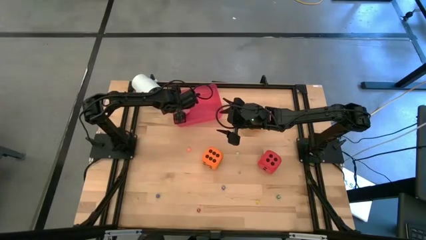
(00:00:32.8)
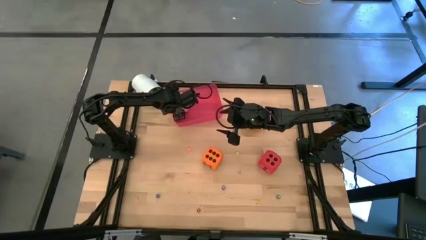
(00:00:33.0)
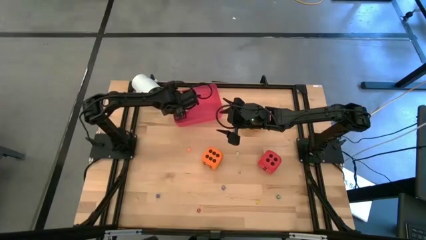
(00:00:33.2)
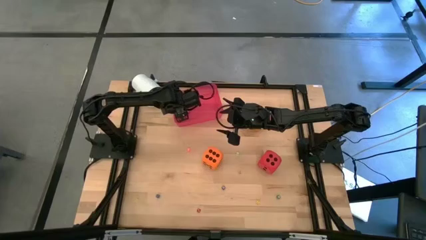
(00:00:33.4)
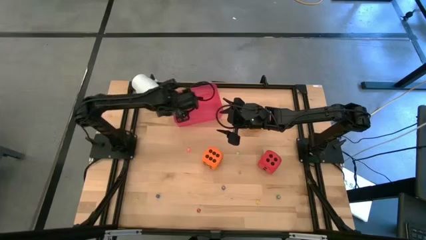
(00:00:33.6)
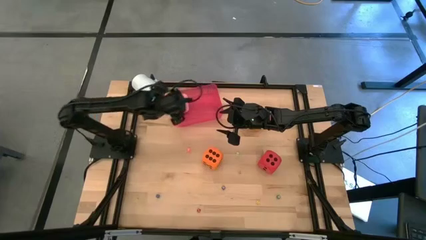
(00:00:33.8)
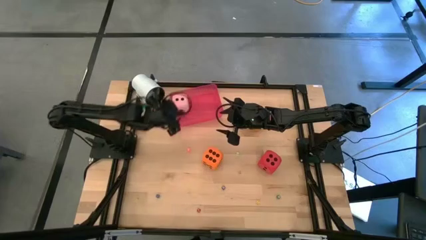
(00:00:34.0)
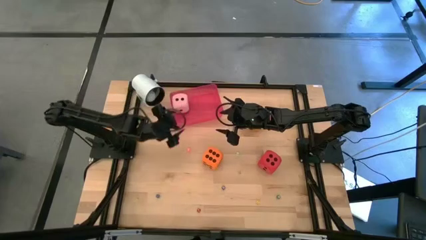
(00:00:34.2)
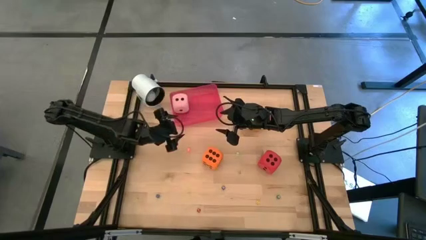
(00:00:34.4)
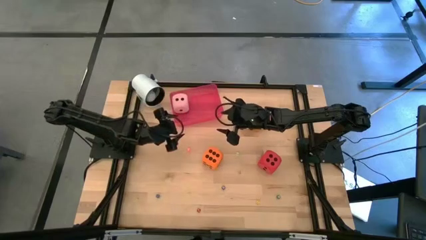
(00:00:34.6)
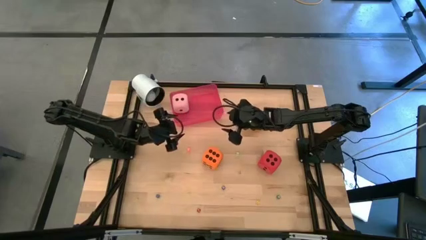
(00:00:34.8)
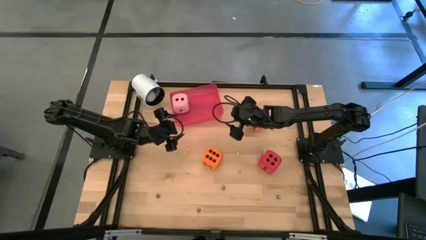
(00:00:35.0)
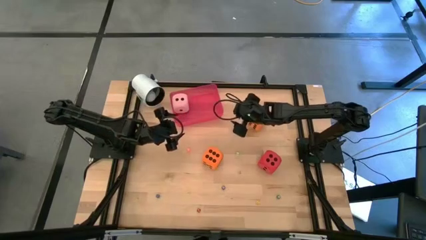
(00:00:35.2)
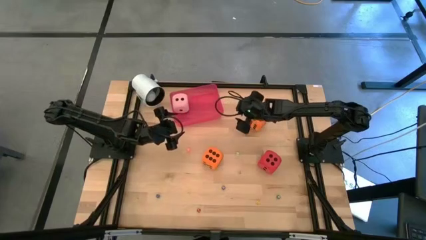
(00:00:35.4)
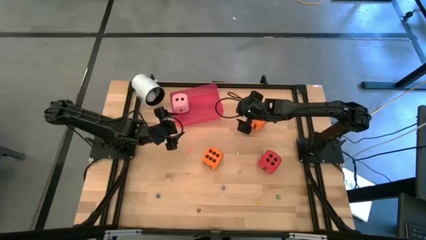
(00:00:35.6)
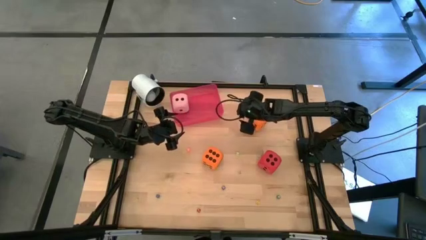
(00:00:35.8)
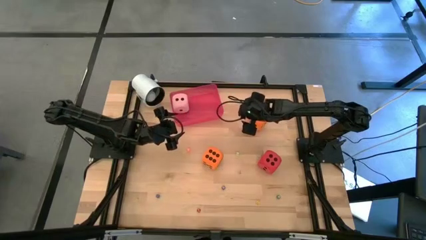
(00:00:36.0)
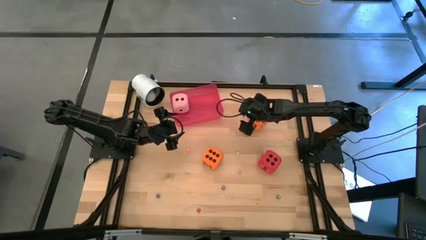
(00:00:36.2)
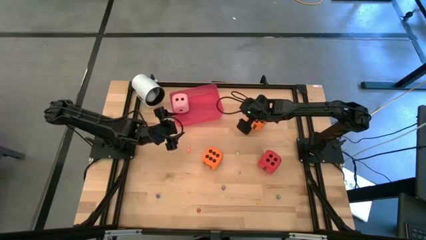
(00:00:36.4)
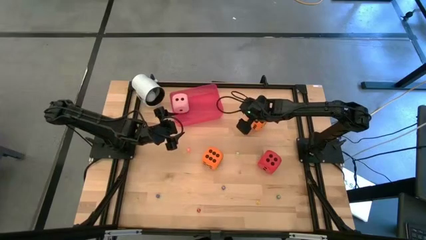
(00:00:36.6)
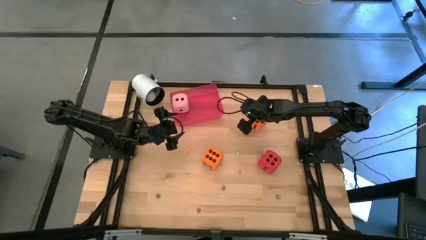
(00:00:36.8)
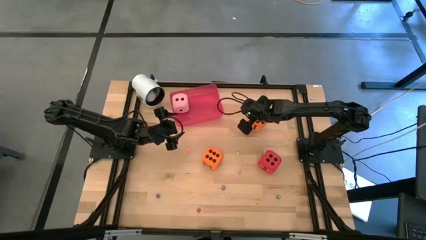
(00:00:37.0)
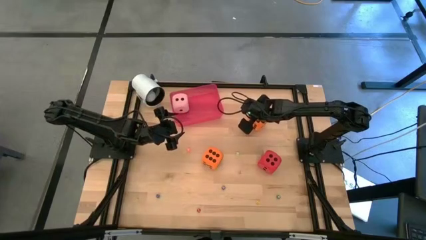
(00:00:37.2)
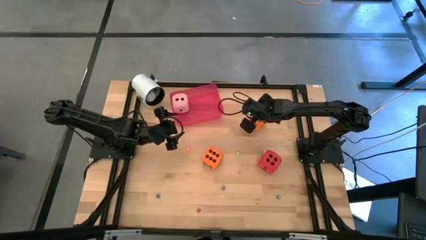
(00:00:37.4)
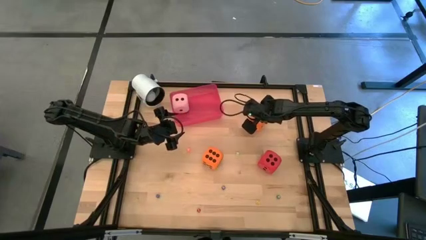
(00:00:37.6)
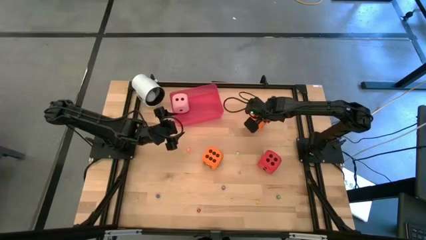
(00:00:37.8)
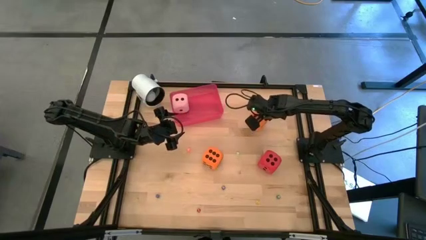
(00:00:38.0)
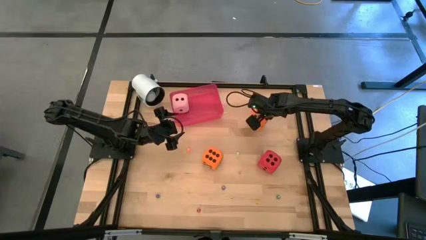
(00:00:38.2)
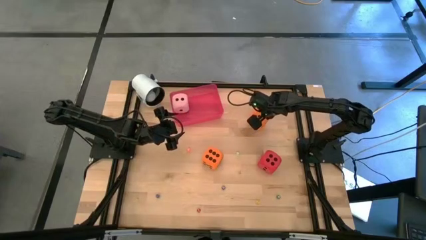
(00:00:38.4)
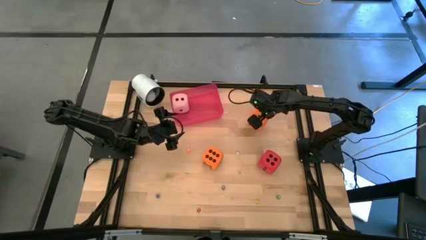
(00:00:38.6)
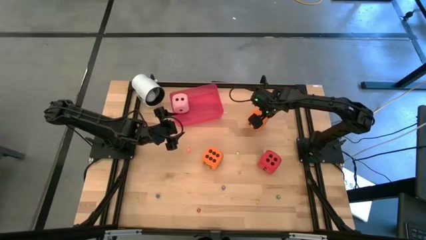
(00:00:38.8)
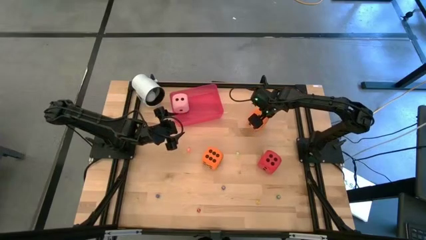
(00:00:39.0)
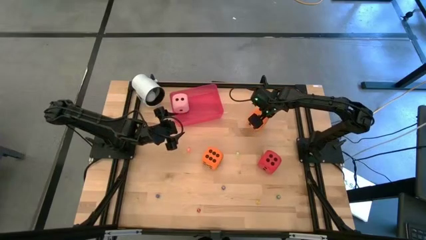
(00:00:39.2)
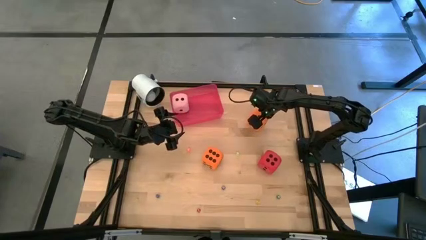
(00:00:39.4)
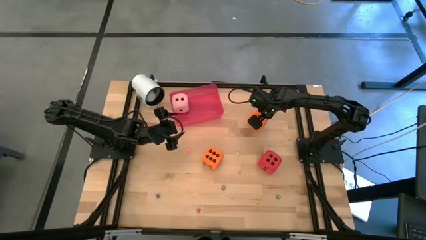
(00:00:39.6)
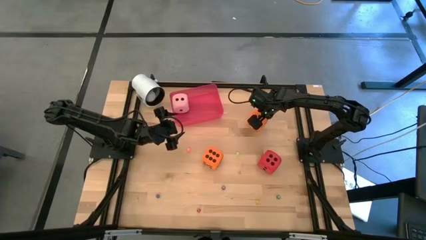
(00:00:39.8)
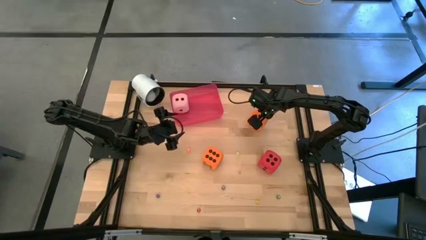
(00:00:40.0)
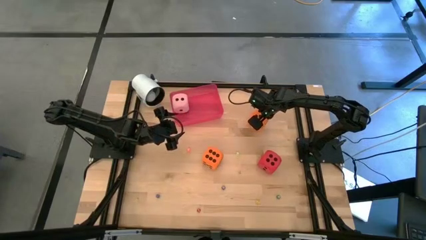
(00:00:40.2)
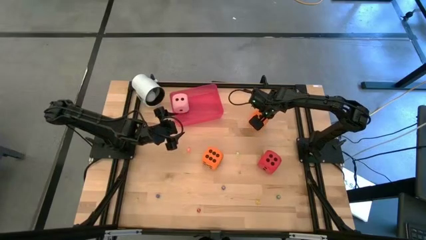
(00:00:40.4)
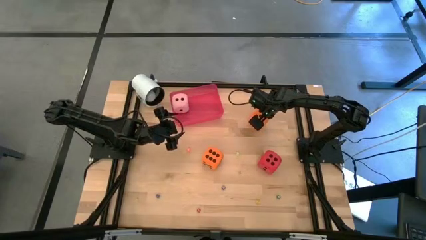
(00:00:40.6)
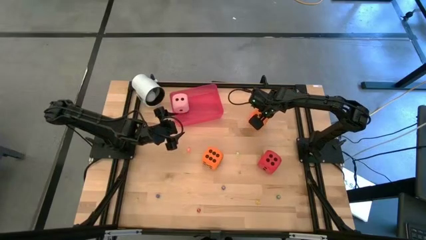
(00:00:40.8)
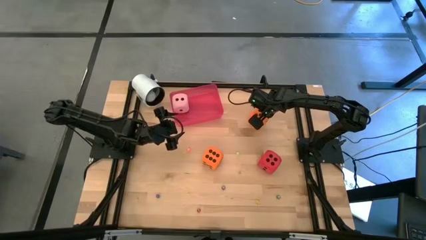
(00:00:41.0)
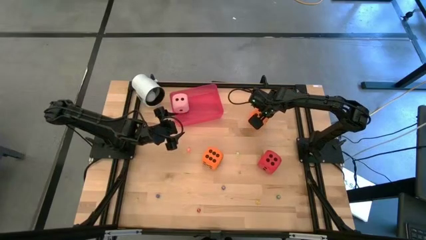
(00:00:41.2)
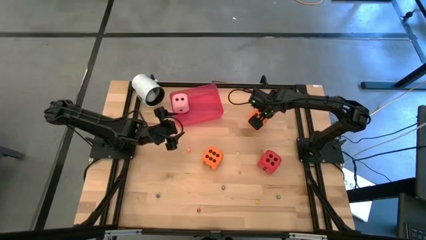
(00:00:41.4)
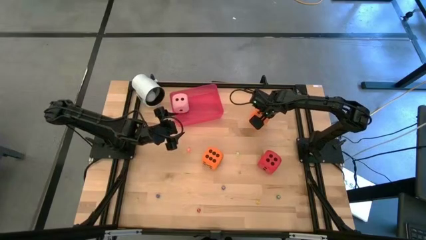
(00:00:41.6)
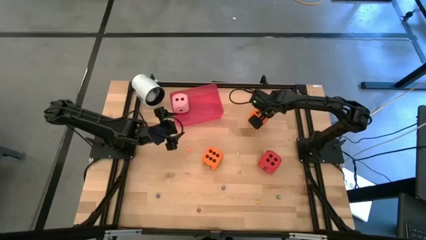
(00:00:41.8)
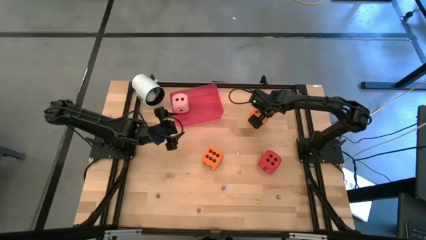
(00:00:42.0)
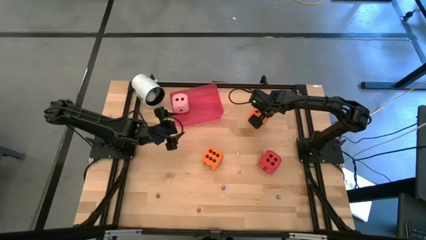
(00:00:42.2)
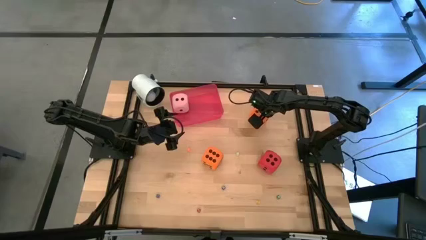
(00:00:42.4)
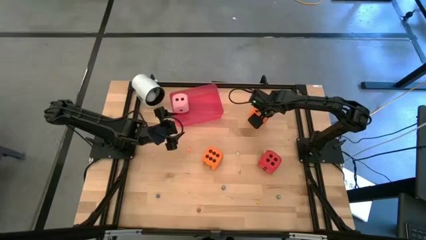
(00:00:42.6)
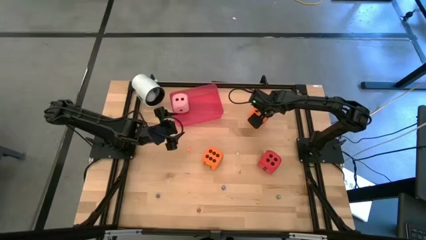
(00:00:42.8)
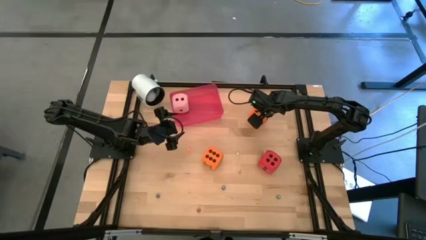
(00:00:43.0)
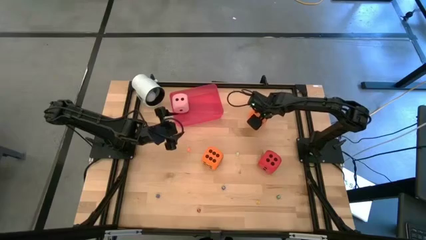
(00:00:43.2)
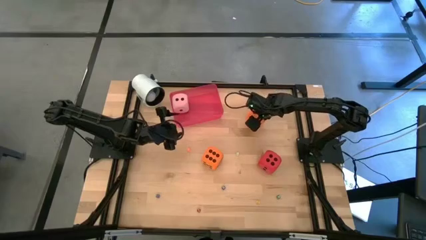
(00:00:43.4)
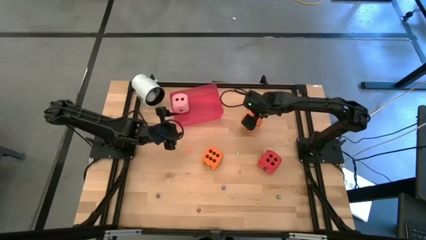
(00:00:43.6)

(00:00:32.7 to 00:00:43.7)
Task: Pick & Place Dice
Put the right large orange die into the red bin
